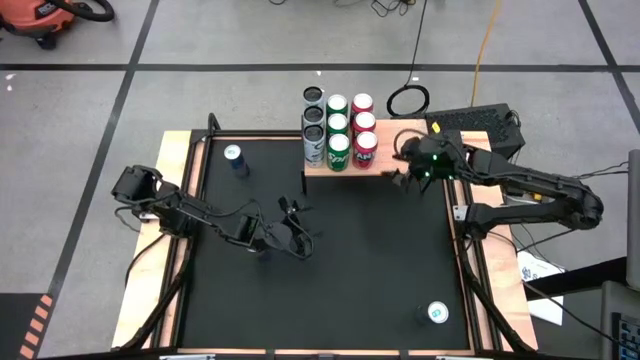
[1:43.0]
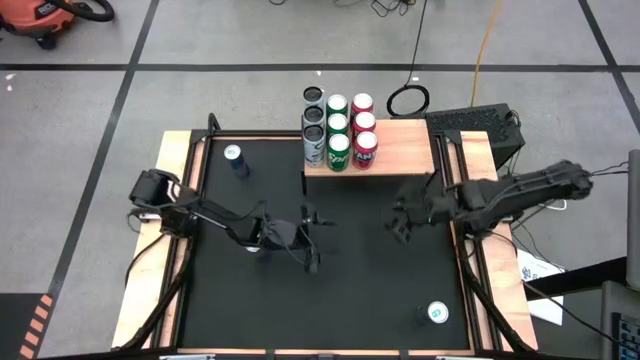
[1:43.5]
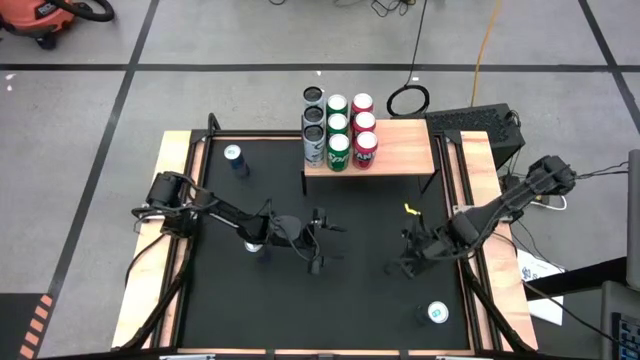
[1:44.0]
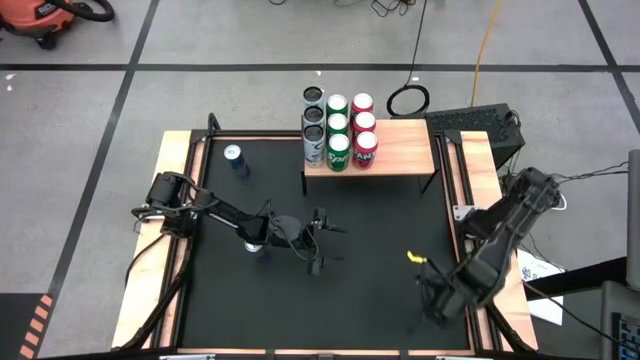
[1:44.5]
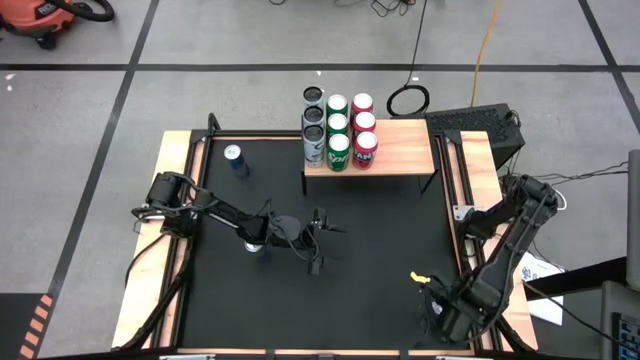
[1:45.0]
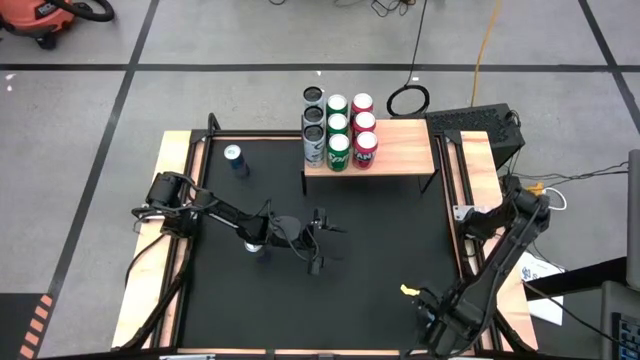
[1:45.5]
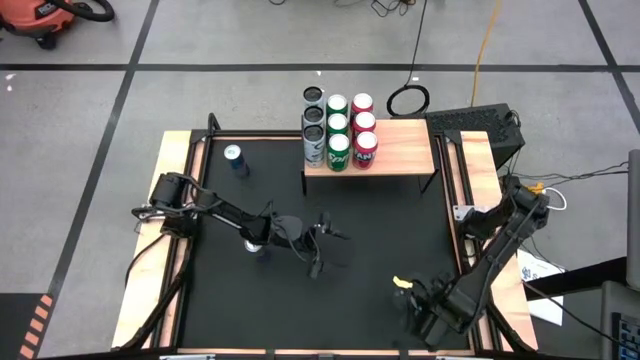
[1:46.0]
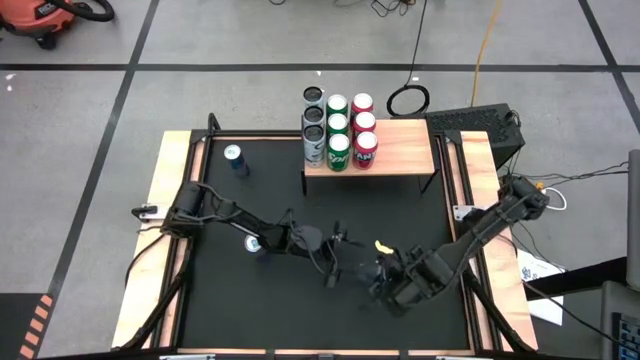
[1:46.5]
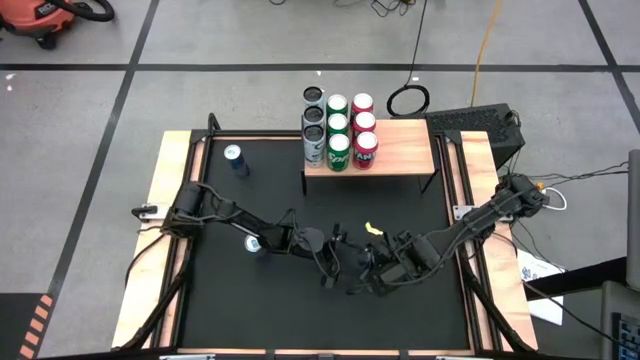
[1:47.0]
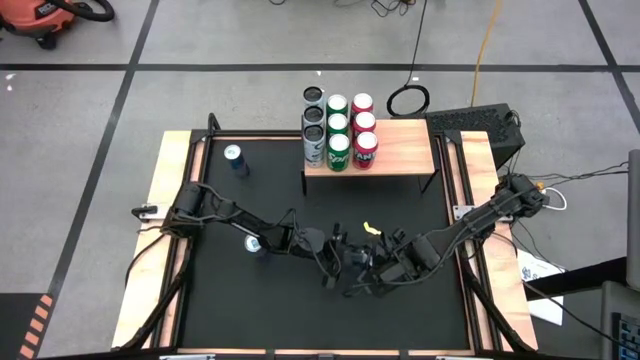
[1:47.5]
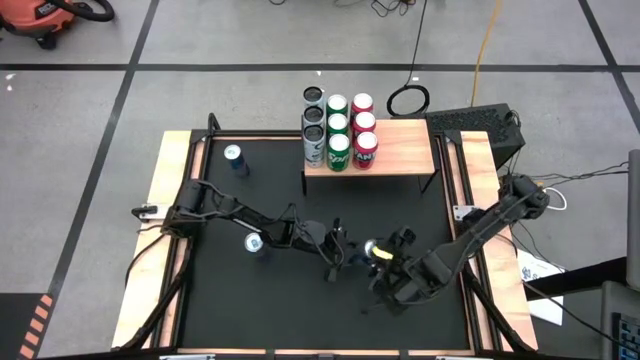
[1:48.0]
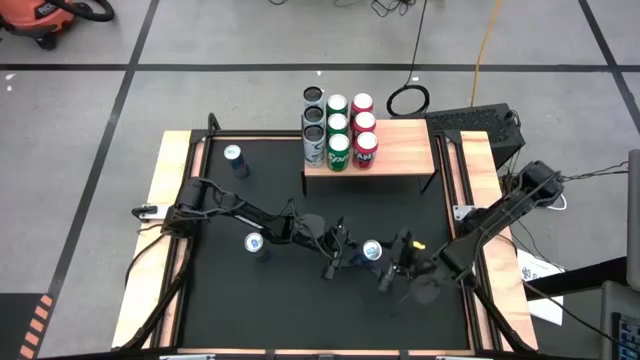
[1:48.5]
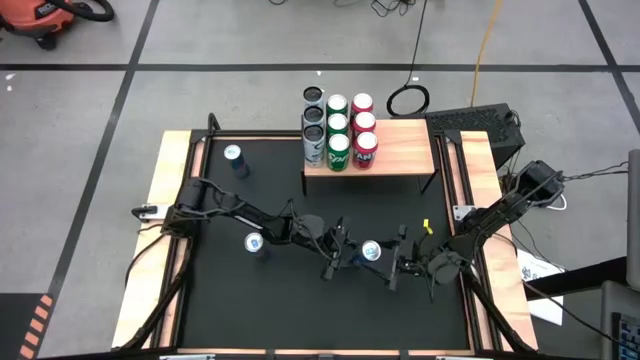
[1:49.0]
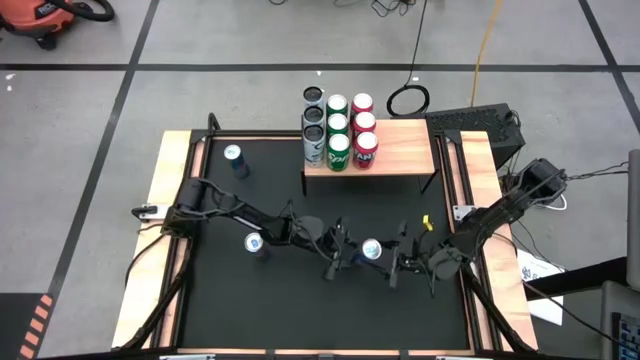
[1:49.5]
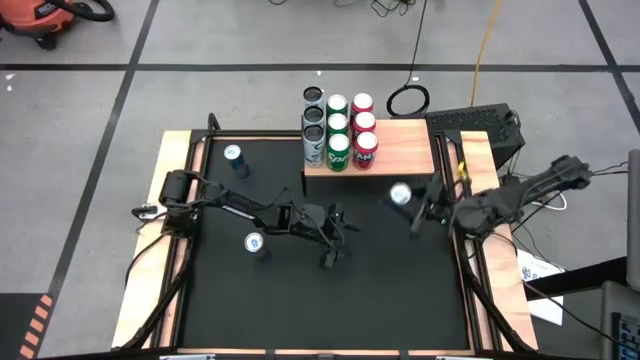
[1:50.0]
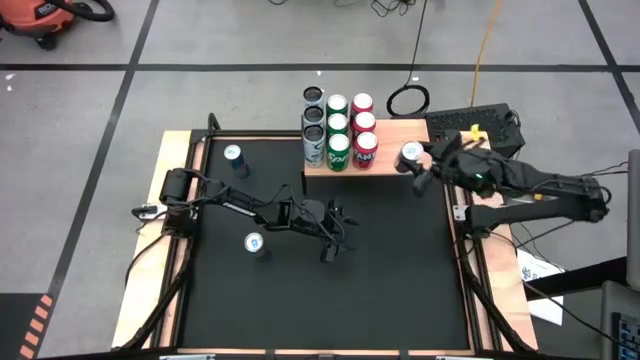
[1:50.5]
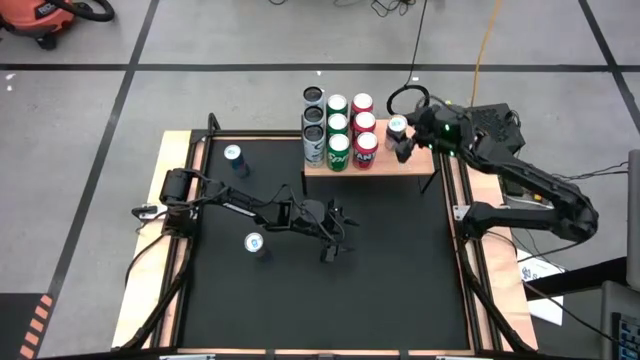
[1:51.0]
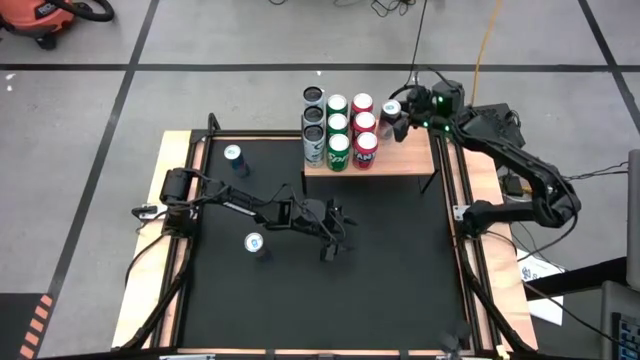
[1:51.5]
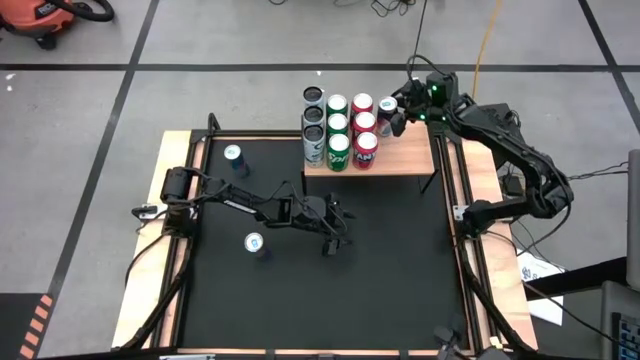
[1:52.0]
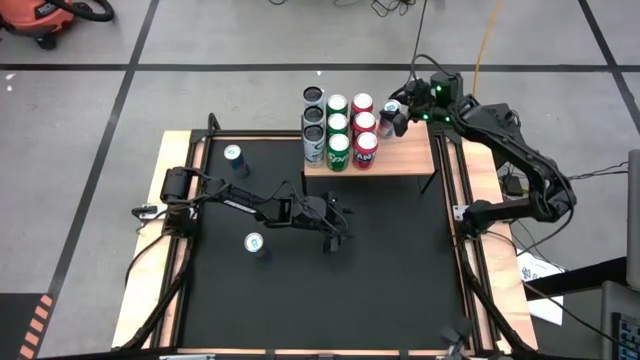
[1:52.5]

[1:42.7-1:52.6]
Task: Place canned beverage on shelf
Put the bottom blue soda can on the shelf

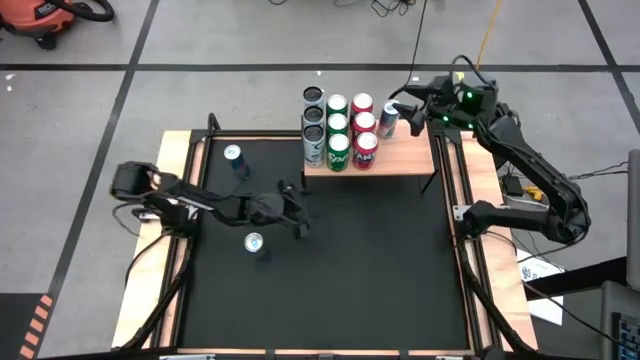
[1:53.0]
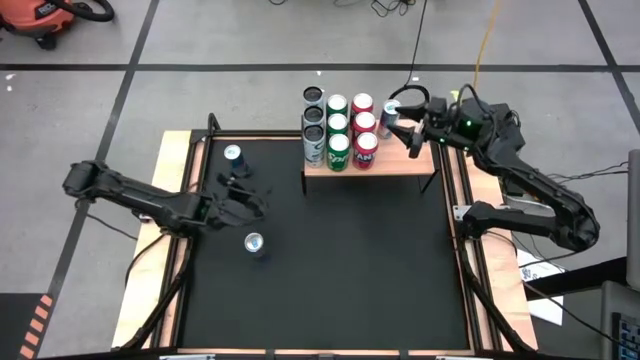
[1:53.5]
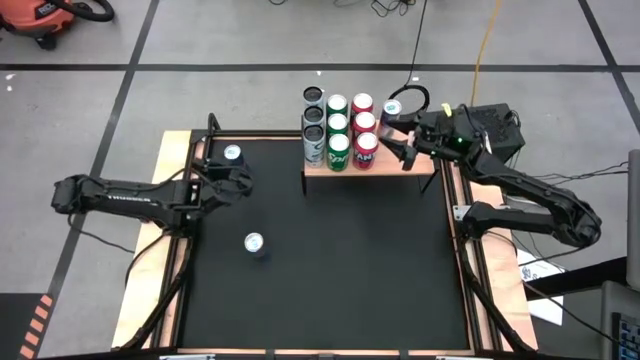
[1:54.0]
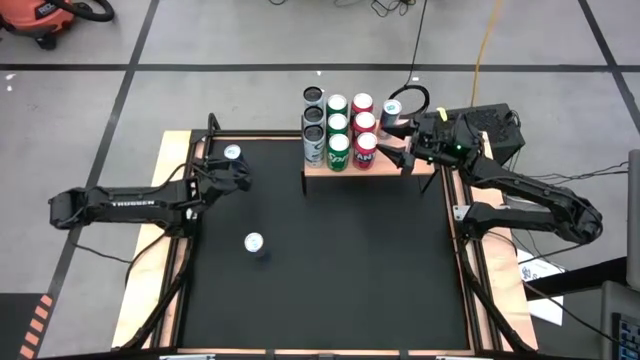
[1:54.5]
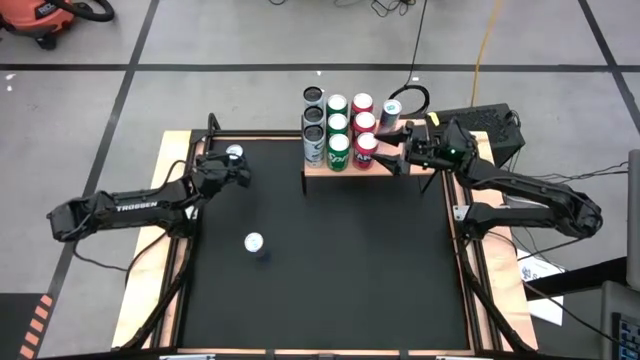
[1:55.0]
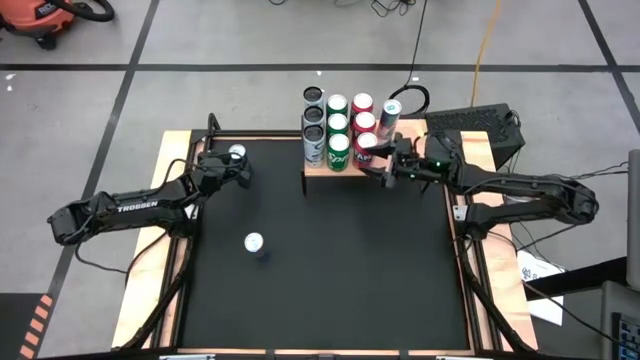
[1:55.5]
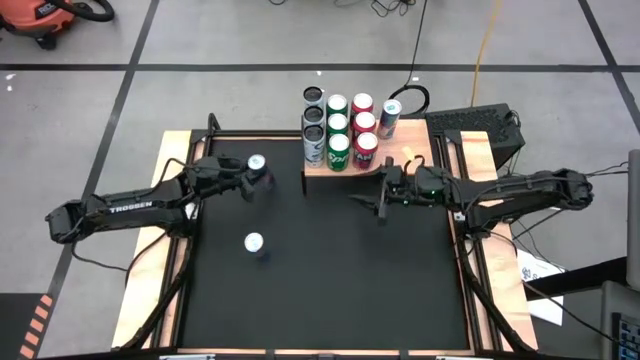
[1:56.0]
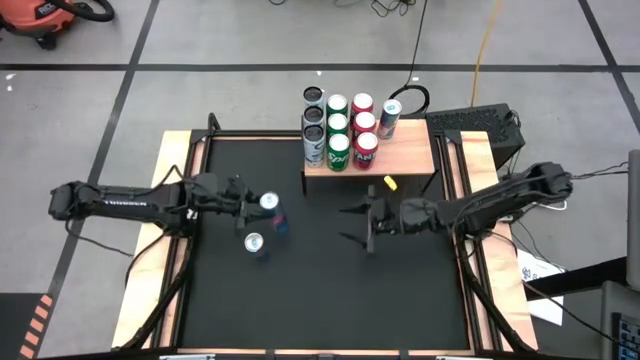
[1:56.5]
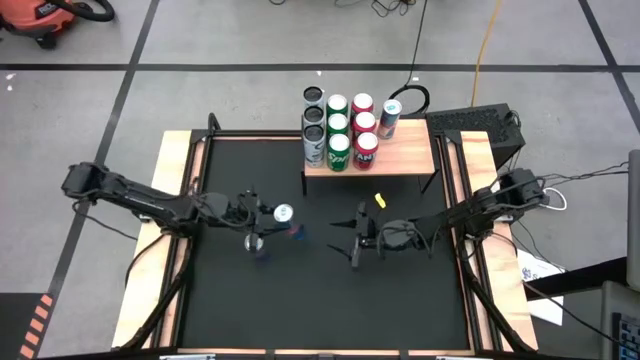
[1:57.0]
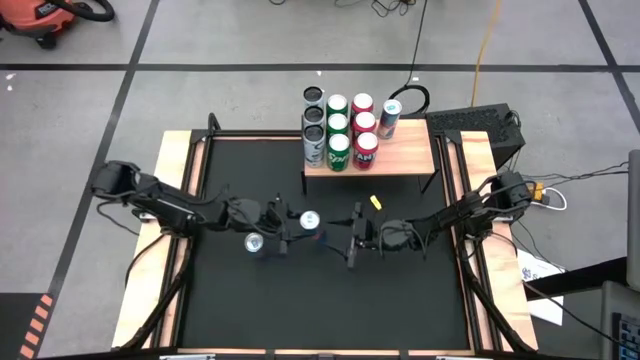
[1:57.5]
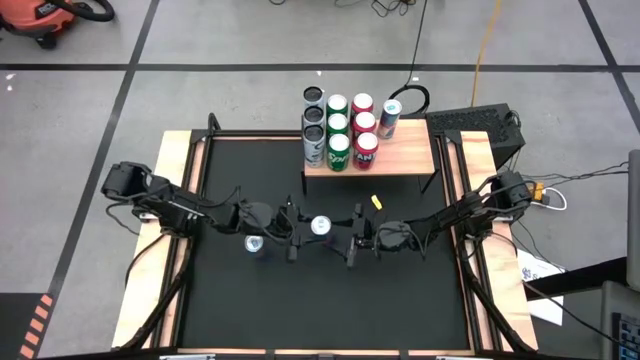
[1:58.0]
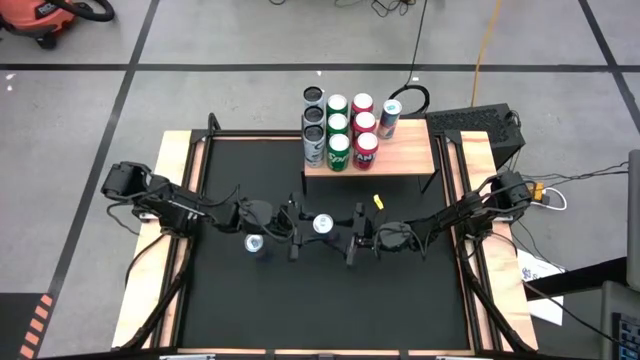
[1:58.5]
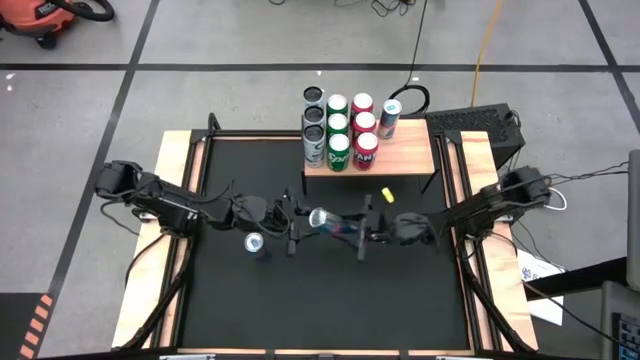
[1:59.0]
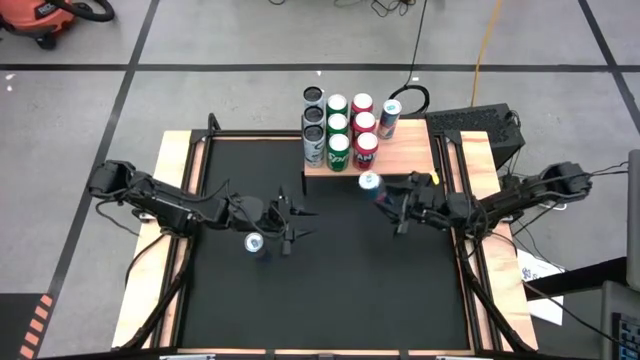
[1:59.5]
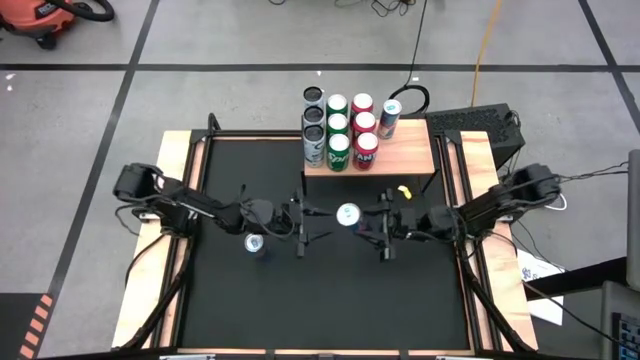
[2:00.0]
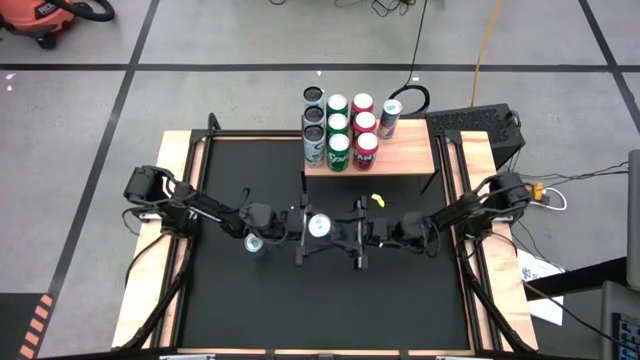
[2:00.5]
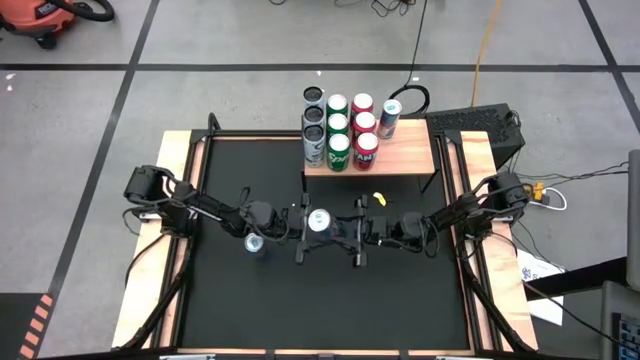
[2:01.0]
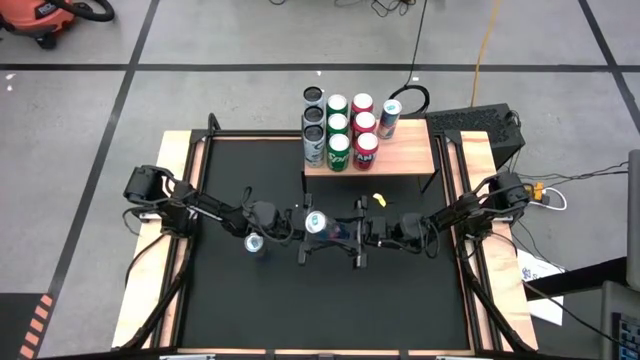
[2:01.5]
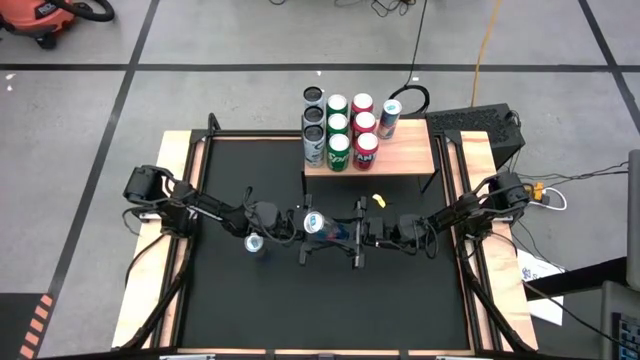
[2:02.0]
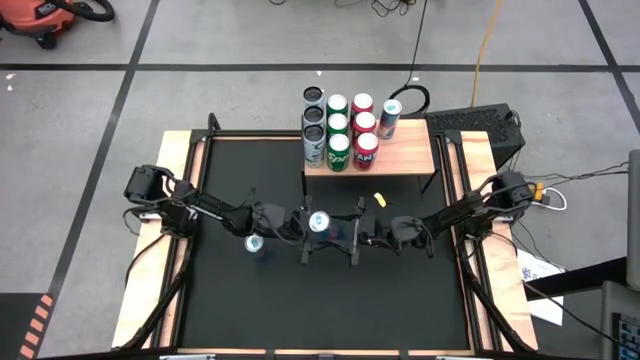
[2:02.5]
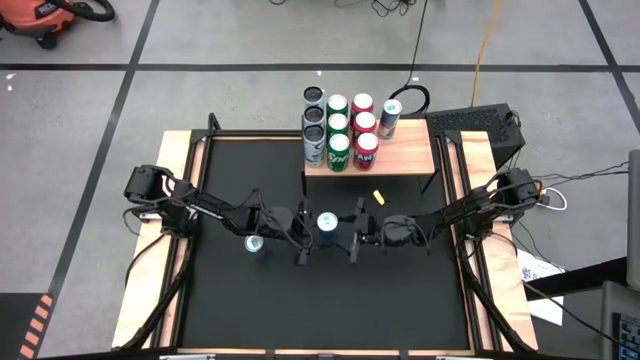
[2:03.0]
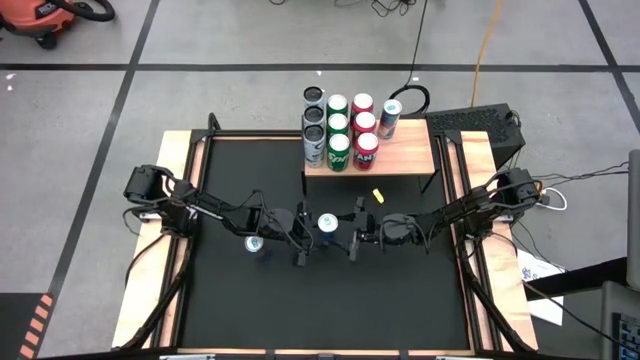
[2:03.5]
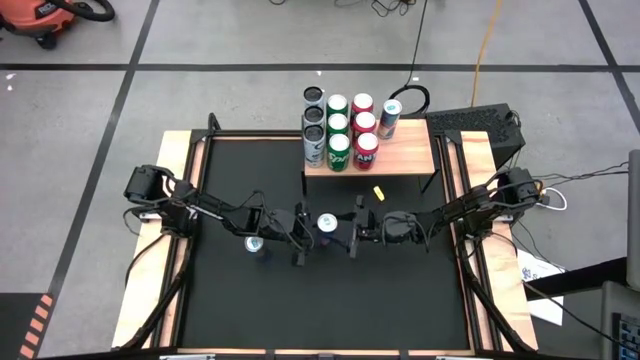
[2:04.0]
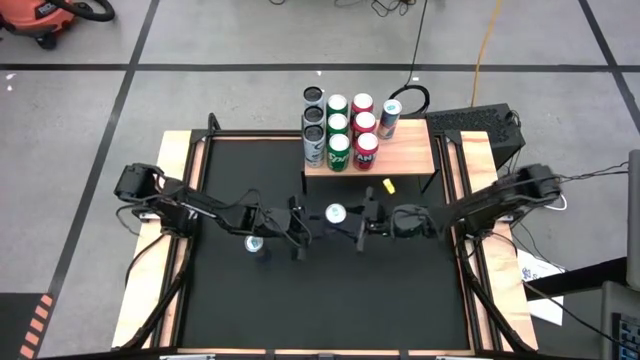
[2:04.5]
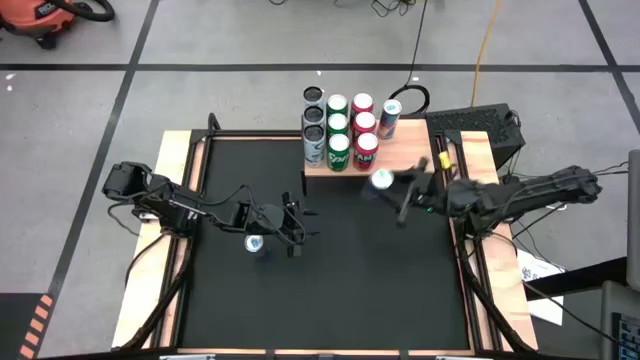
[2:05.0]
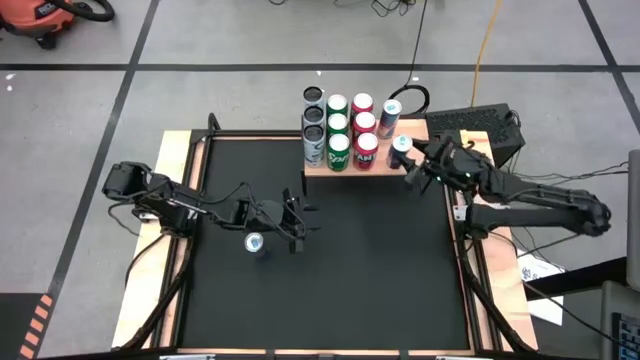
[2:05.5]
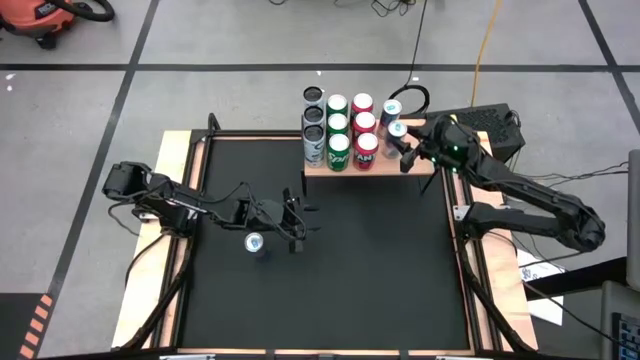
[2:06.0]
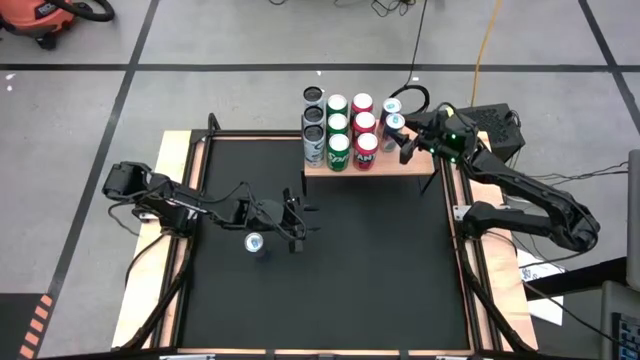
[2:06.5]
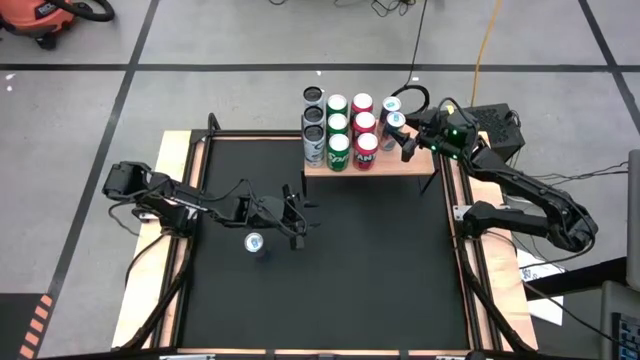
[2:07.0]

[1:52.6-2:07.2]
Put the top blue soda can on the shelf aligned with the other blue soda can
